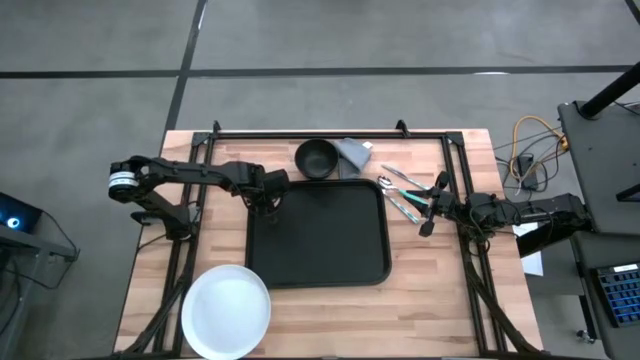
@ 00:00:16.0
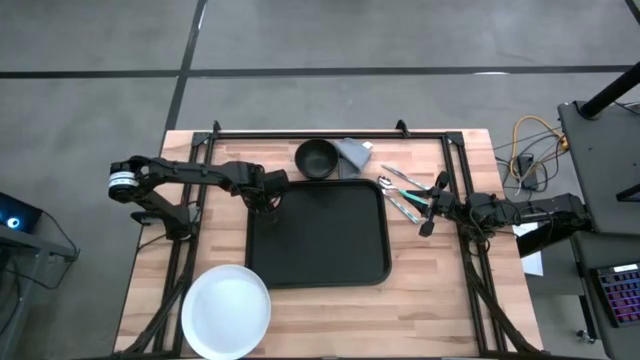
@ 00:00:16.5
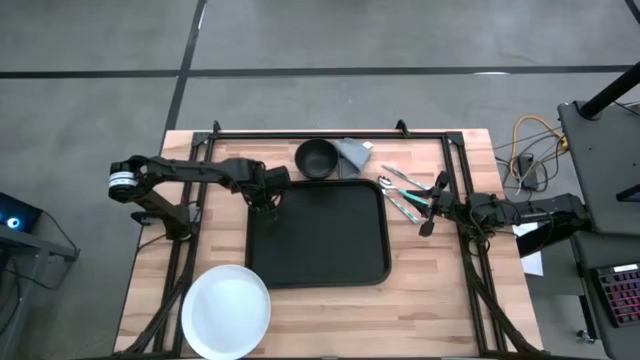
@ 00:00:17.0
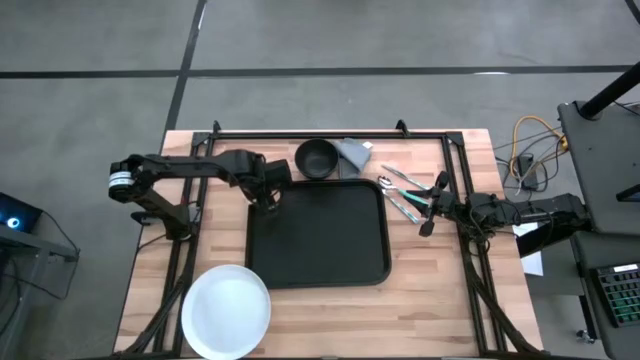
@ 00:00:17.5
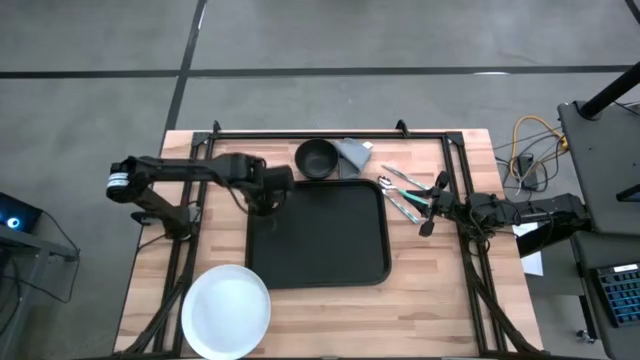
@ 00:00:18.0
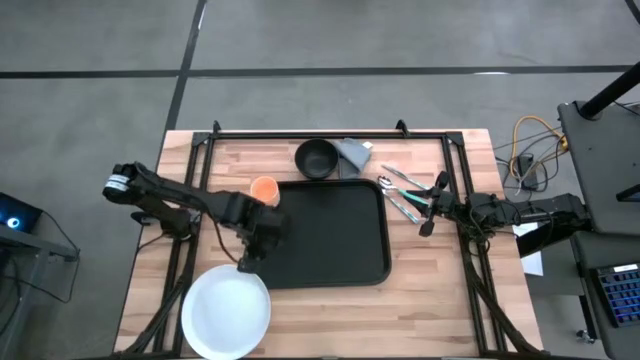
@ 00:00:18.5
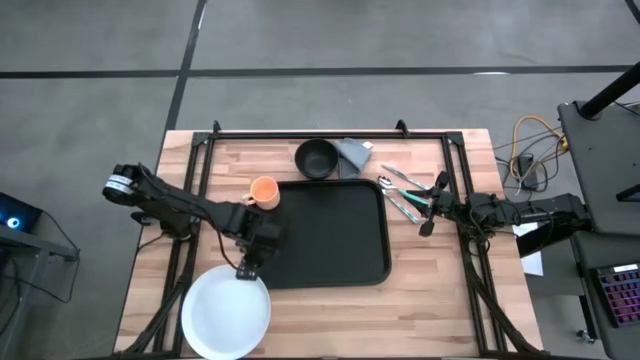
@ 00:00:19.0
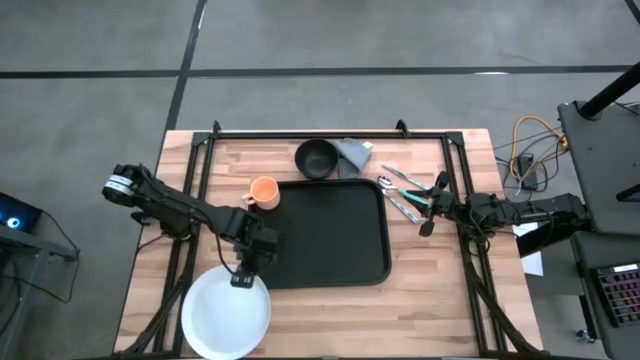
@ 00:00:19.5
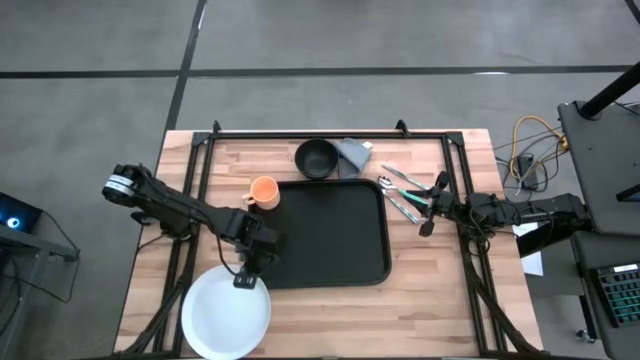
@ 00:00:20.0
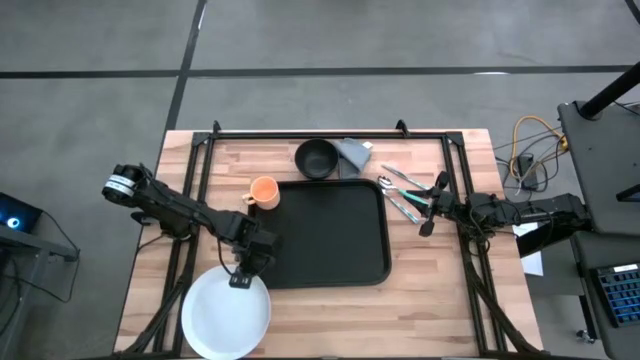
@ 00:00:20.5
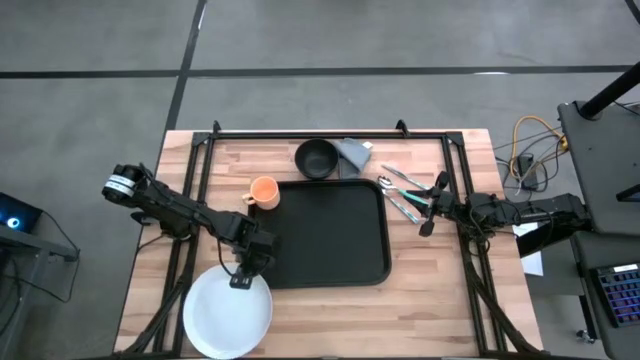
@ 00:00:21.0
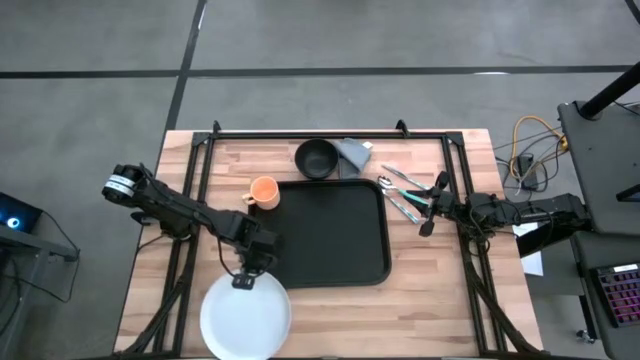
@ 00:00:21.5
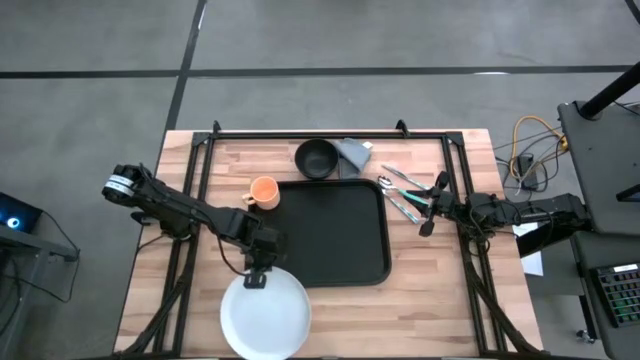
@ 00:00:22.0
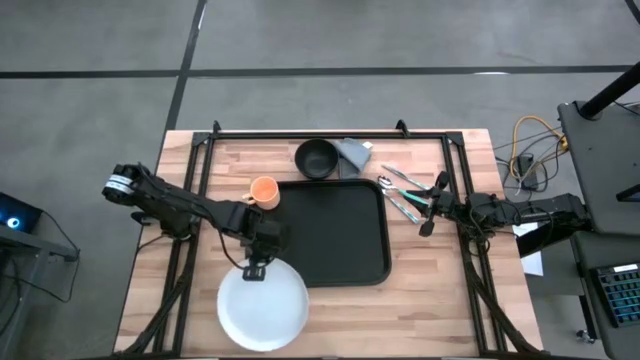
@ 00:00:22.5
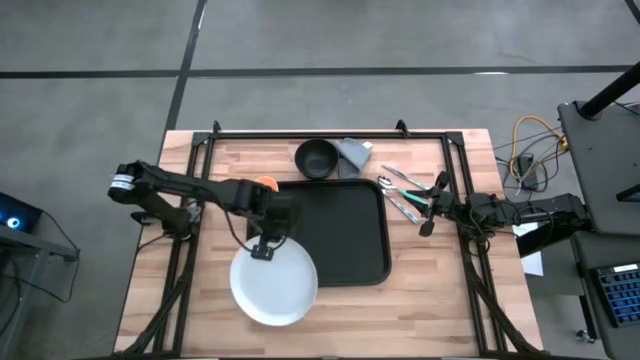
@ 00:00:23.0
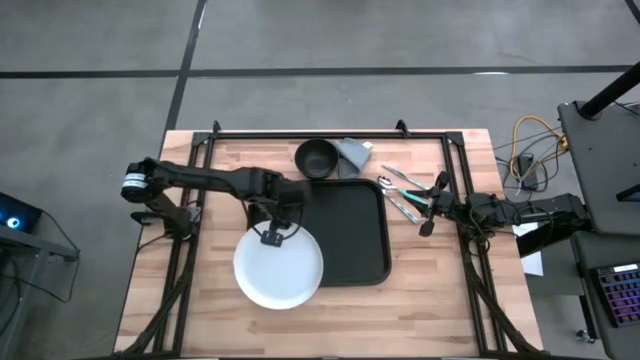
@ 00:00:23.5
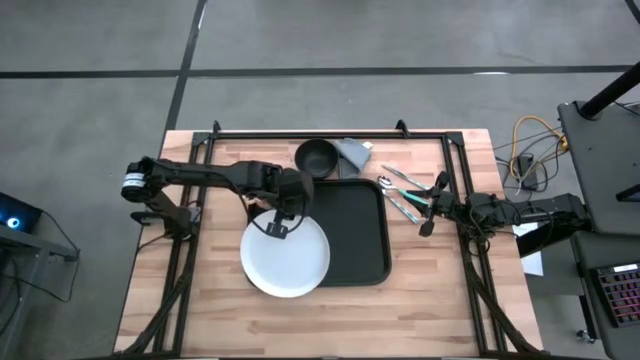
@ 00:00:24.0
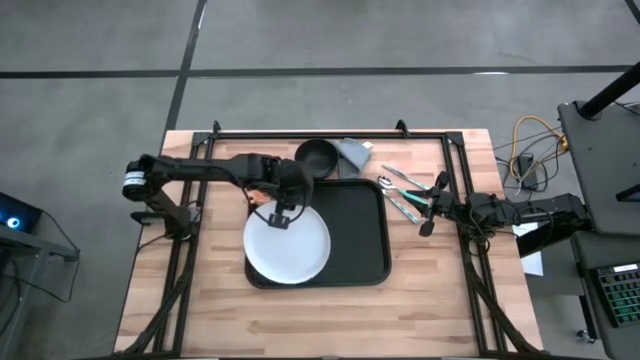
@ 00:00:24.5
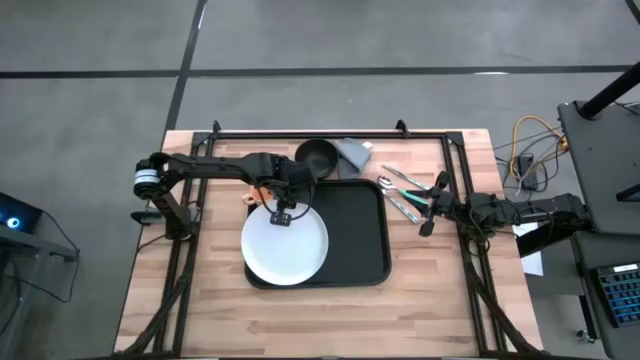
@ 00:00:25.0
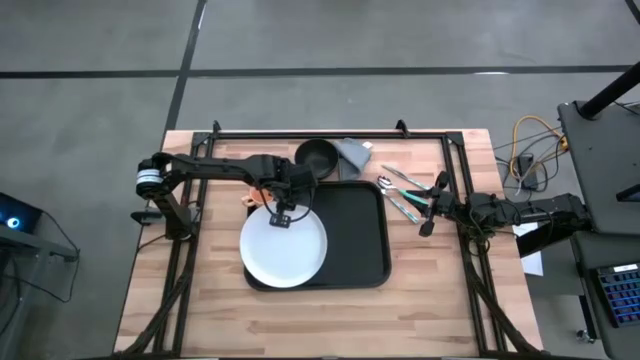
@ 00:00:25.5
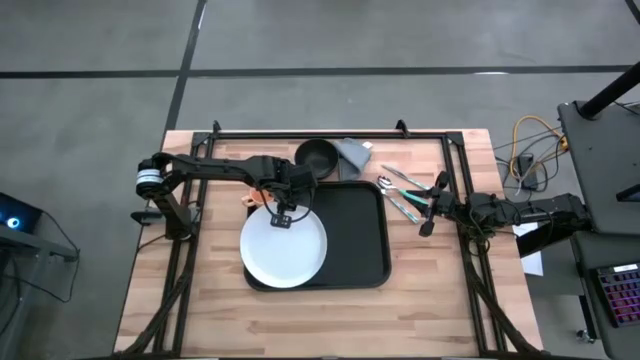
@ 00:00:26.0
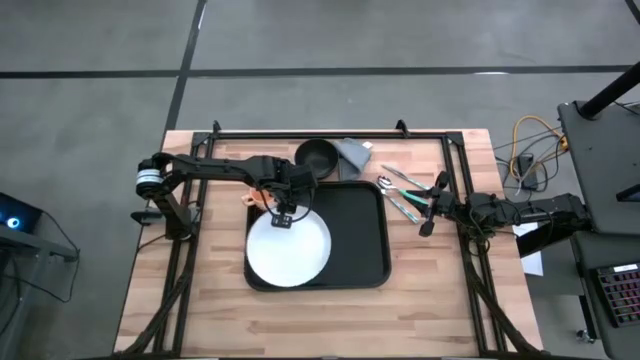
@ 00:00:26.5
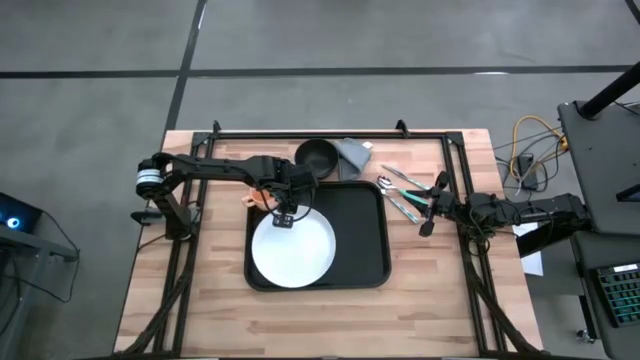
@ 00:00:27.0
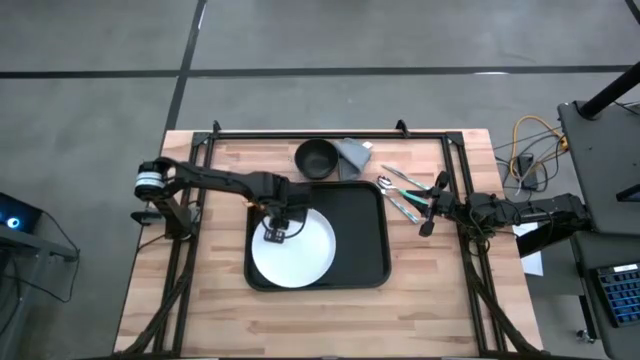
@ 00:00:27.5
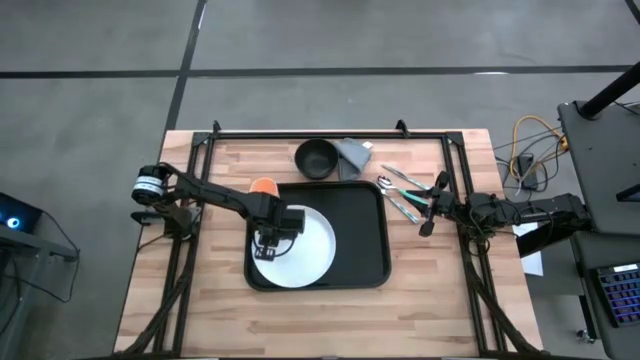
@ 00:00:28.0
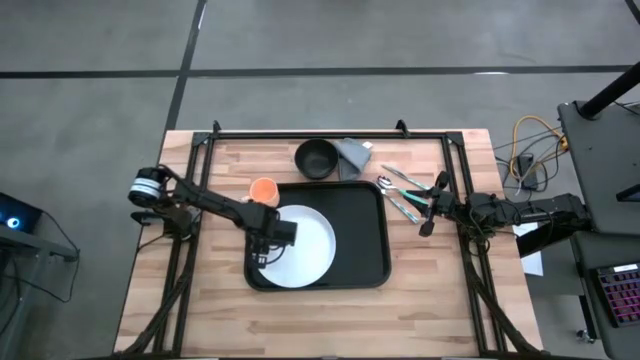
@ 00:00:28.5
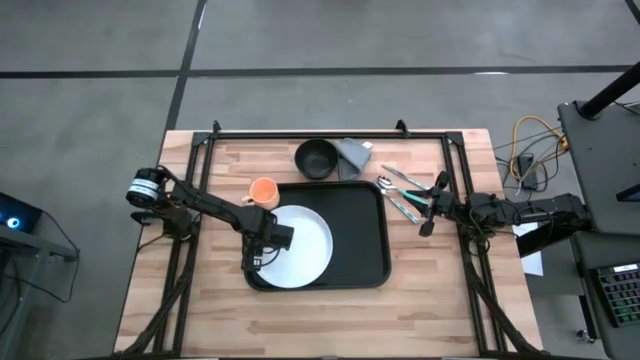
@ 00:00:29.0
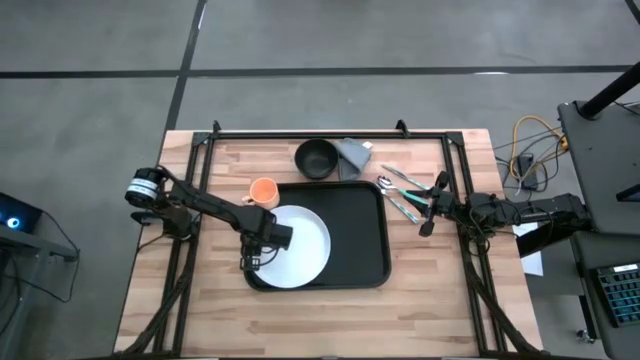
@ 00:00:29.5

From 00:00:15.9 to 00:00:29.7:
Task: Set up tray
Put the white plate on the black serving tray

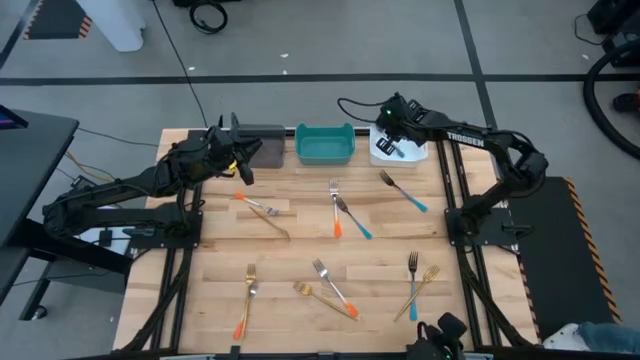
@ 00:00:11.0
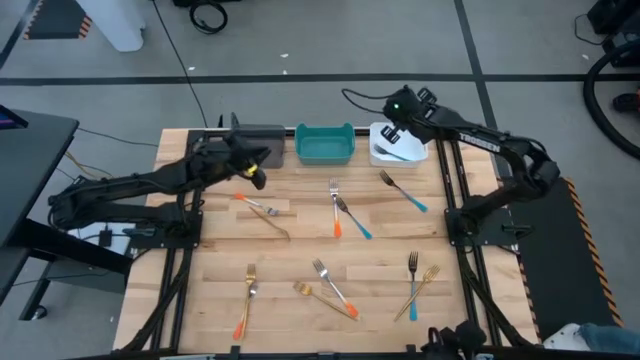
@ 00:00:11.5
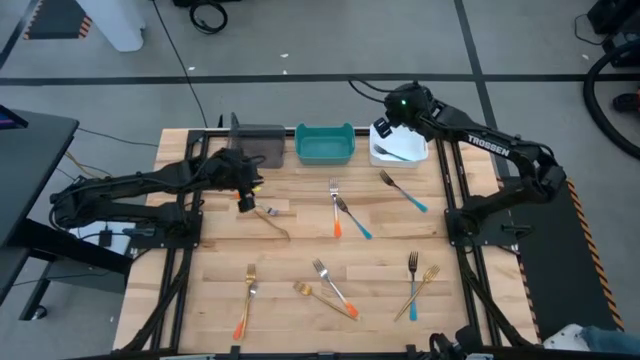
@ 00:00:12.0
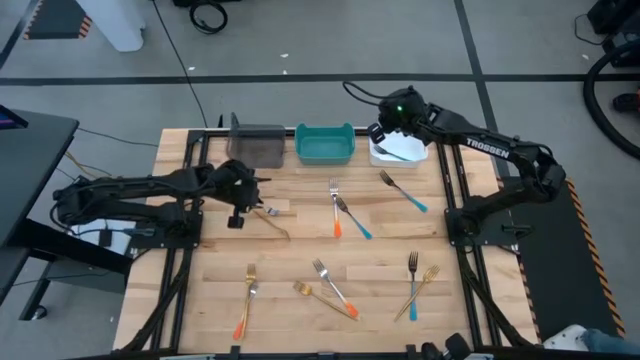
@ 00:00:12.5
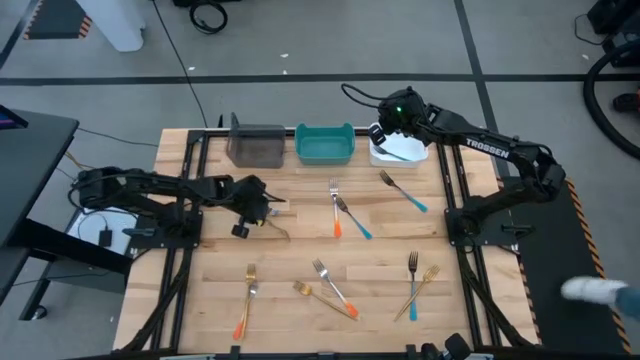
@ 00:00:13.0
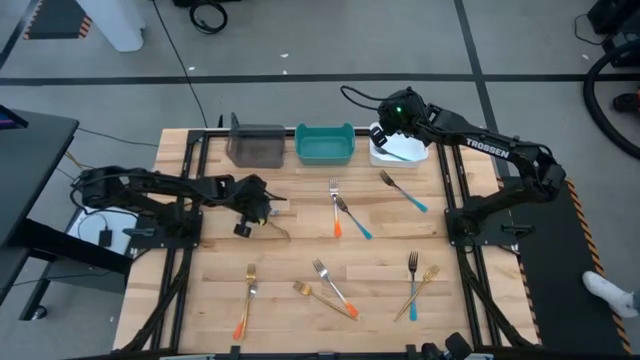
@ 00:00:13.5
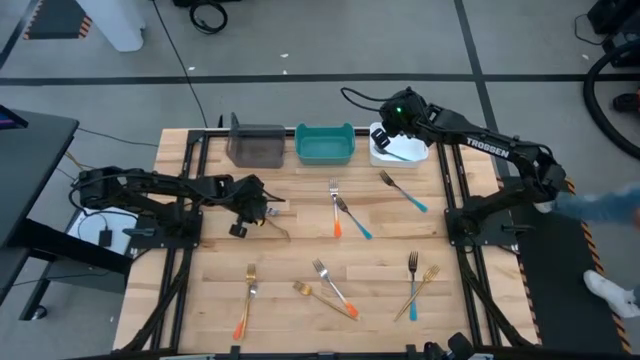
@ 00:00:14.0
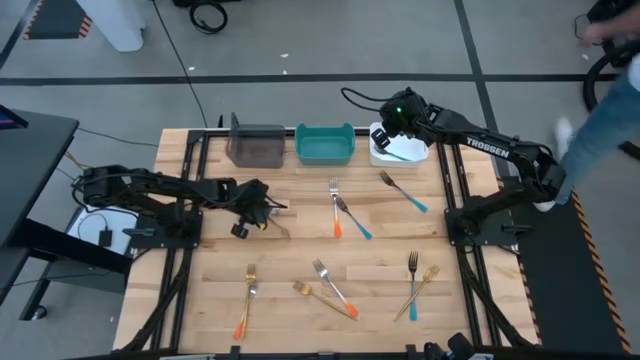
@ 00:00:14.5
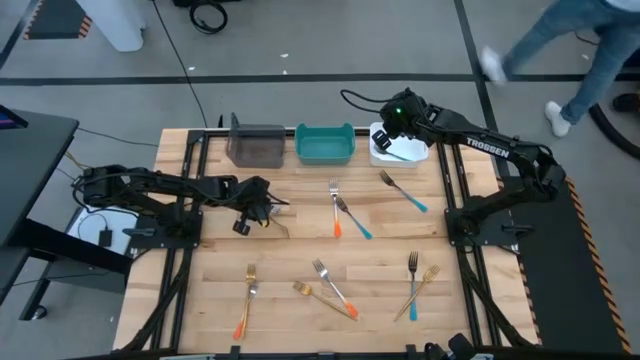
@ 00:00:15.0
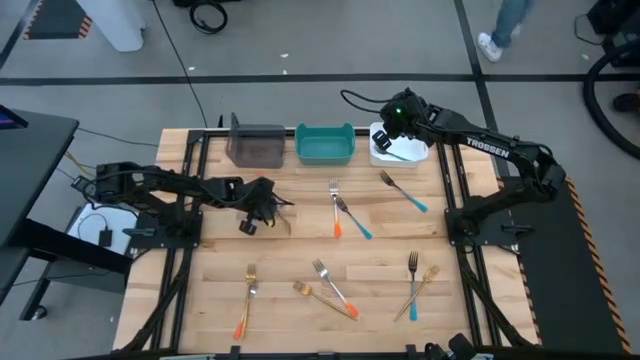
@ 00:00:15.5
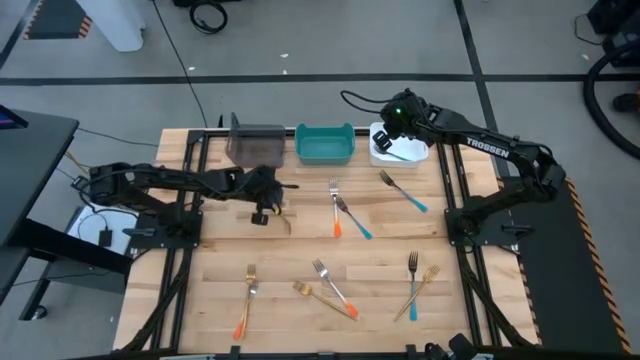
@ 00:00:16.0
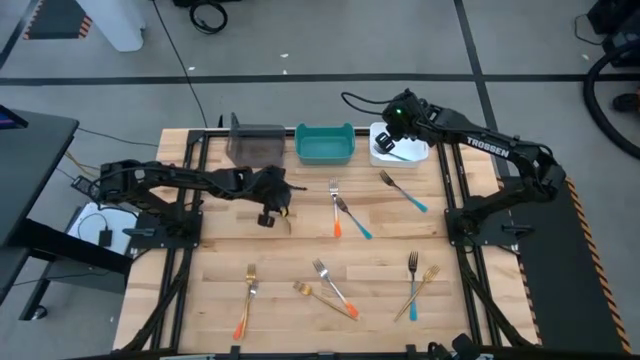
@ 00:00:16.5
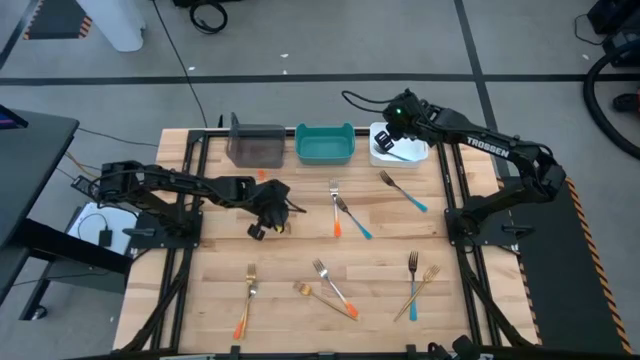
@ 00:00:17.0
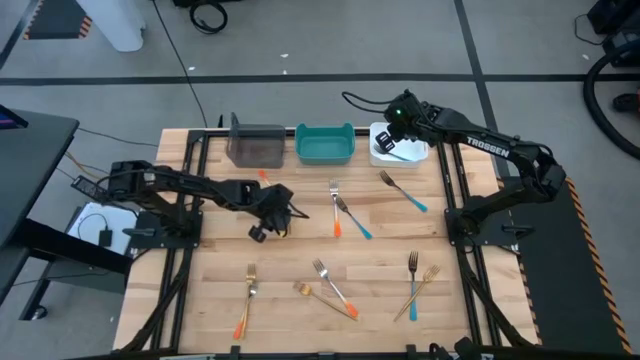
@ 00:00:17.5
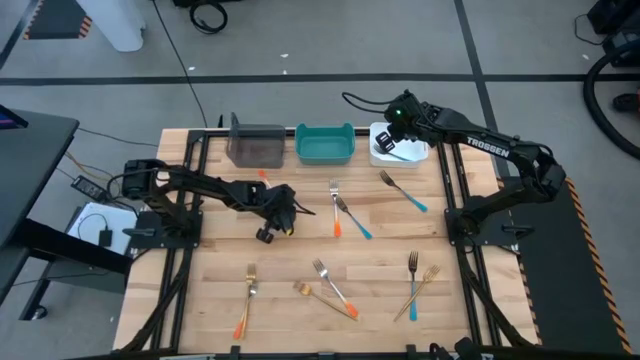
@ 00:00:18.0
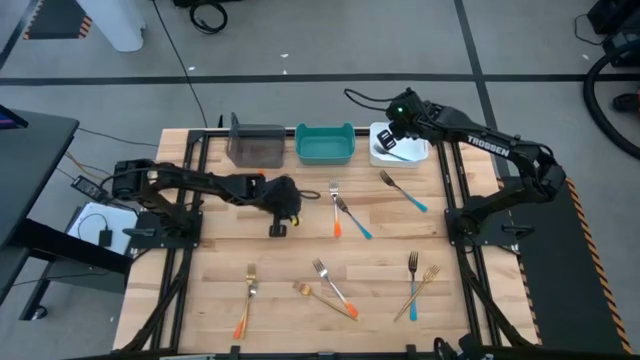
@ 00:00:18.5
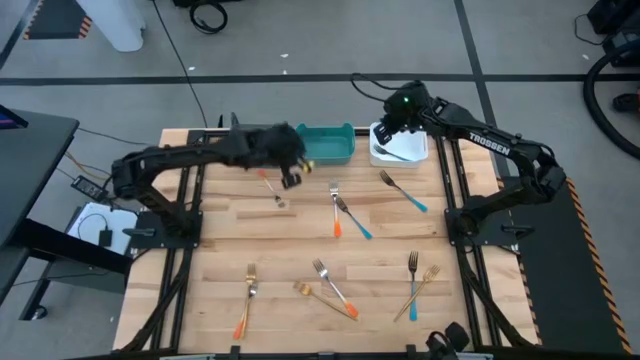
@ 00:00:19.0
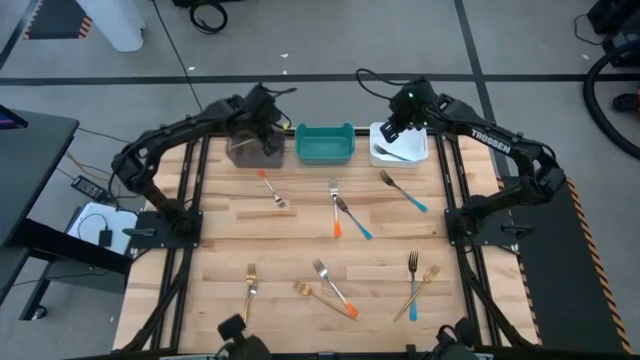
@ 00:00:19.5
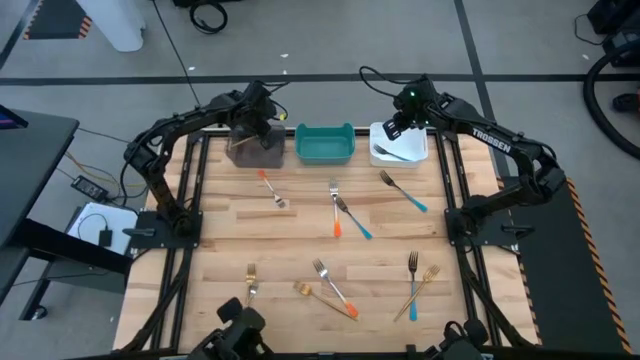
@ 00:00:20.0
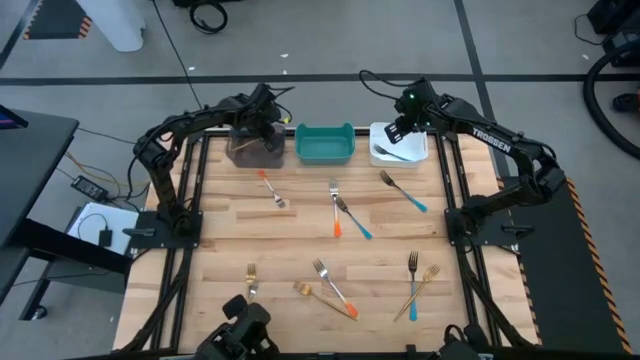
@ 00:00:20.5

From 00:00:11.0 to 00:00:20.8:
Task: Sort silverware by color (type)
Put the gold fork into the black bin
